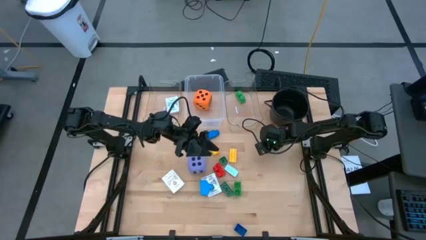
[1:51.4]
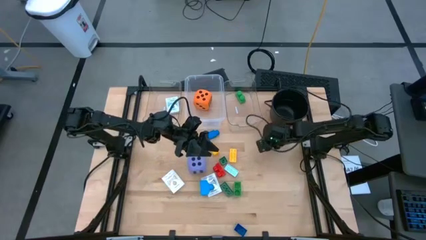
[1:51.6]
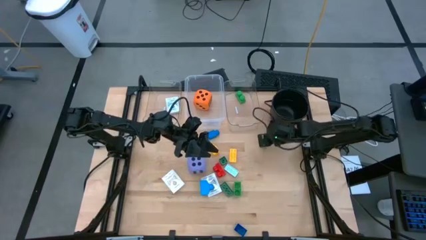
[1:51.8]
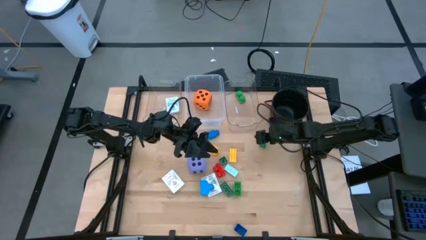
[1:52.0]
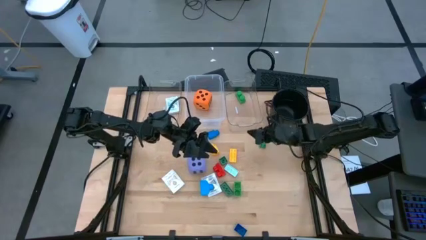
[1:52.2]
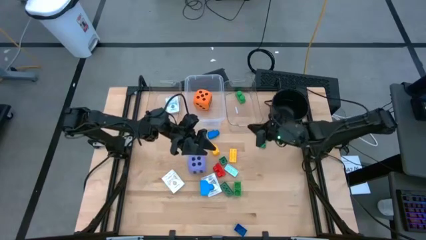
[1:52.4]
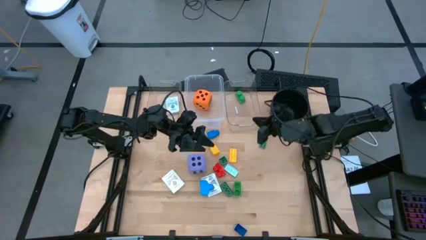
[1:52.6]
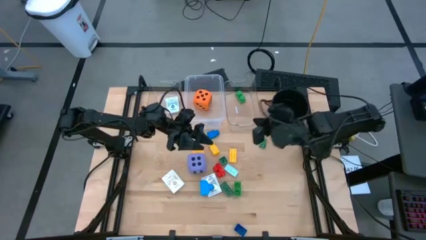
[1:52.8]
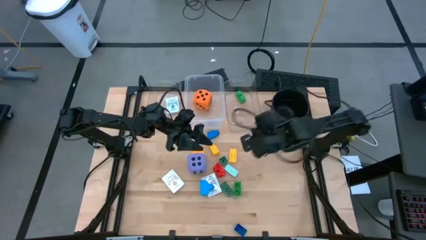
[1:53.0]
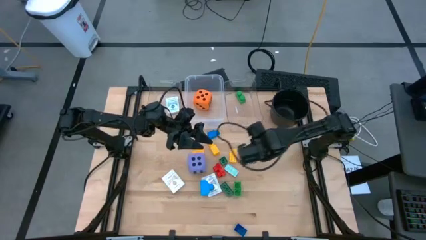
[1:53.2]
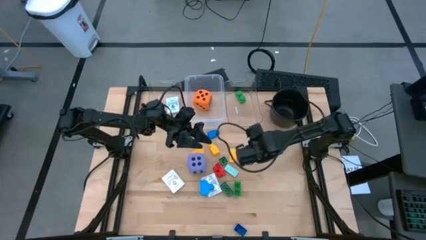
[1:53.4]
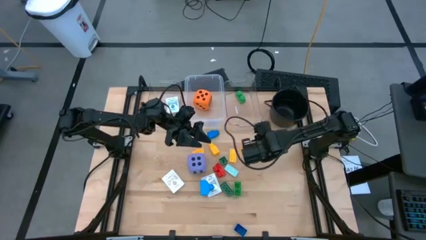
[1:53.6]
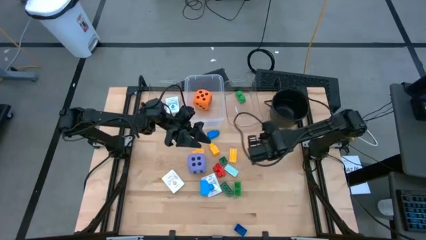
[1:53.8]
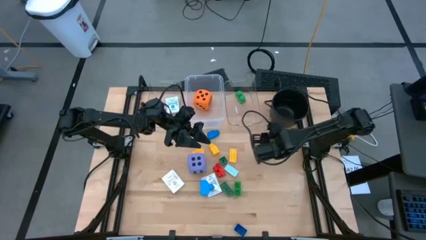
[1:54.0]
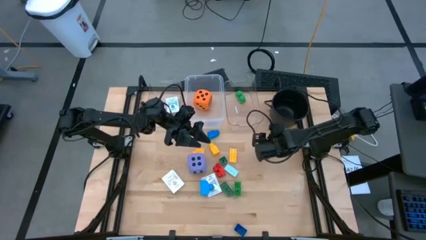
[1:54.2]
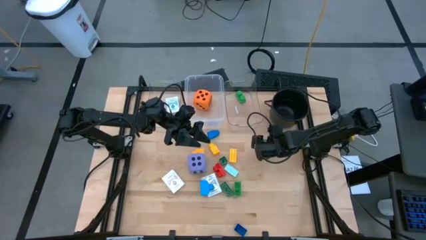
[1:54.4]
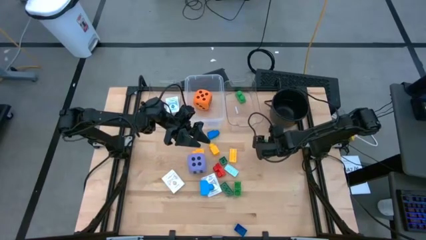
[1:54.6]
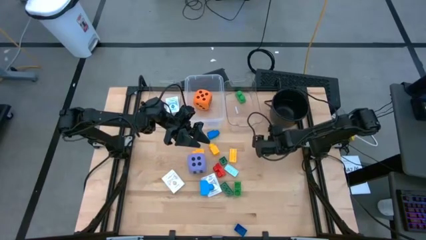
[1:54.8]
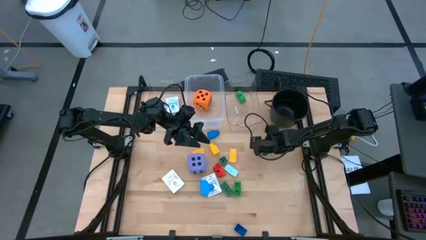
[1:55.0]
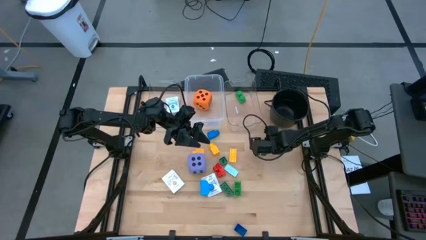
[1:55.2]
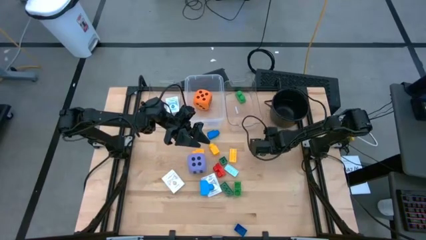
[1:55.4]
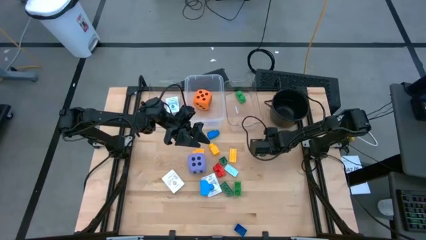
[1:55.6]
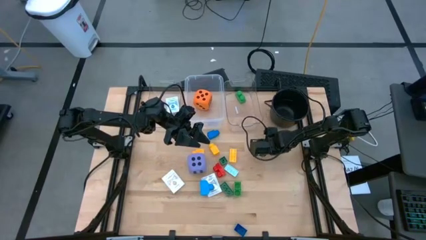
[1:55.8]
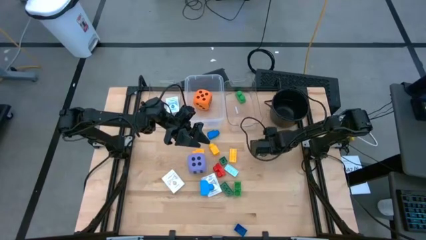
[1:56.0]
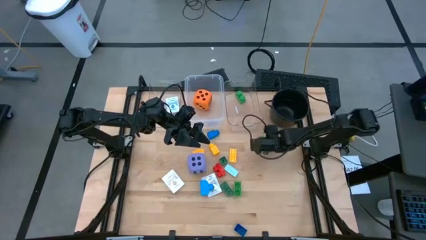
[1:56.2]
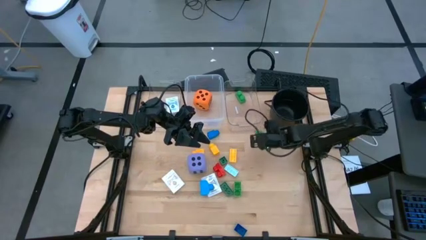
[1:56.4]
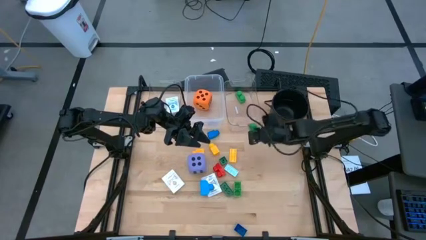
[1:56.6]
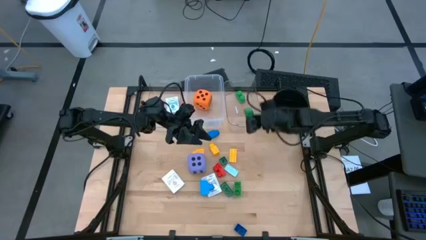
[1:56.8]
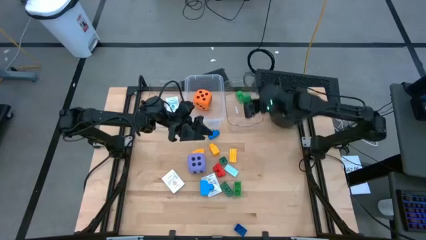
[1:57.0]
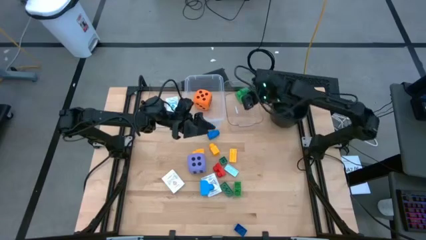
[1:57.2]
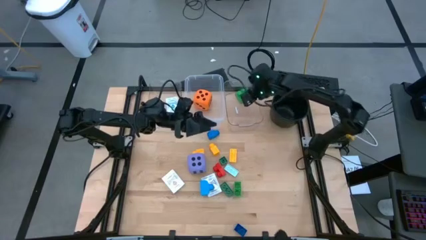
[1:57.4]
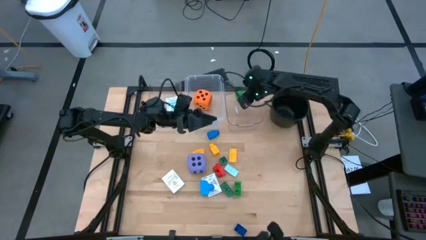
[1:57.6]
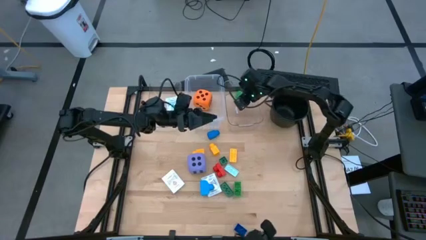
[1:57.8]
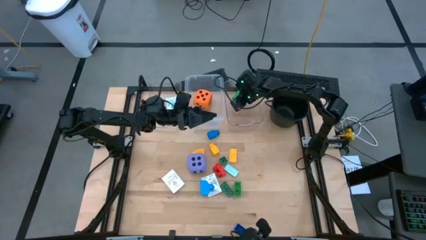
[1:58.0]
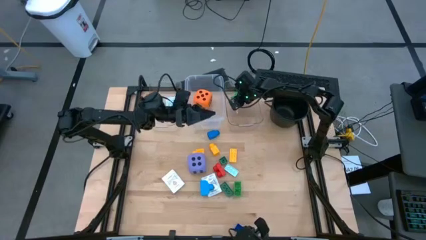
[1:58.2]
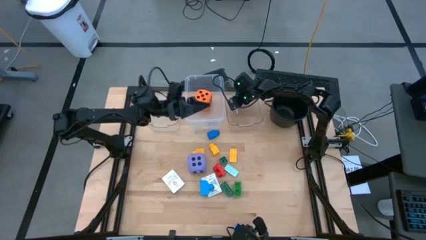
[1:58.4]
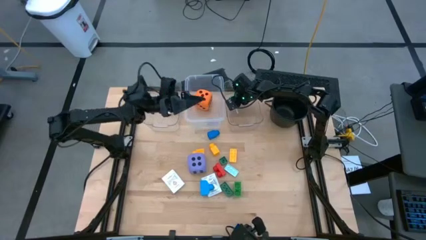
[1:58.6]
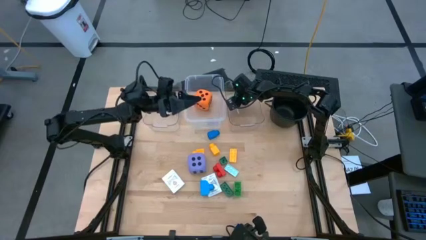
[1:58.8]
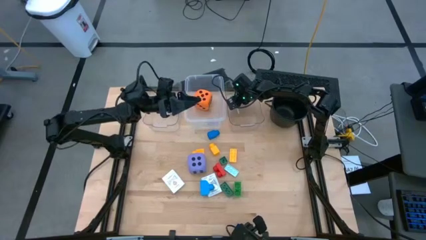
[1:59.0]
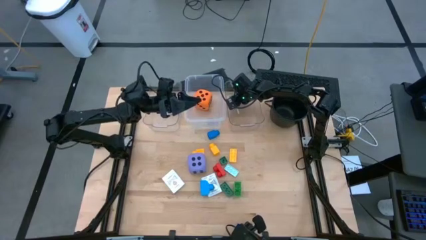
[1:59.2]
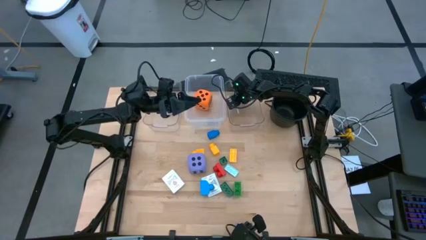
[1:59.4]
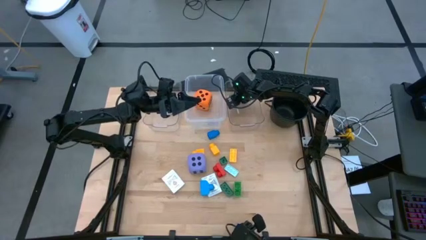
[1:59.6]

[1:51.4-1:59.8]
Task: Pick & Place Toys
Put the middle right dark green game piece into the right transparent bin
